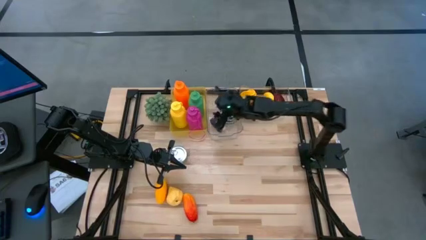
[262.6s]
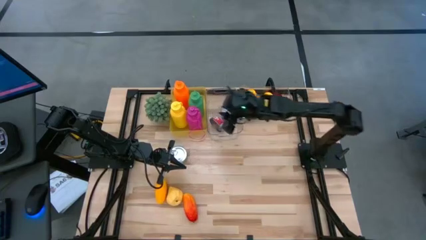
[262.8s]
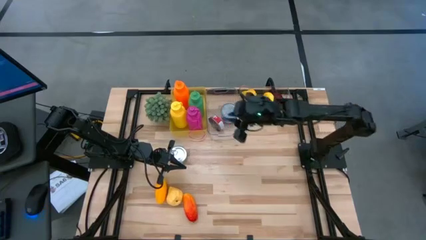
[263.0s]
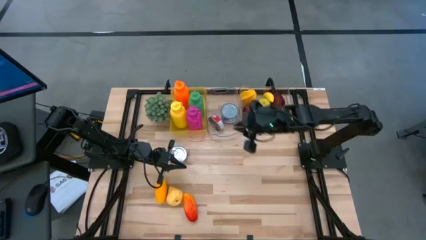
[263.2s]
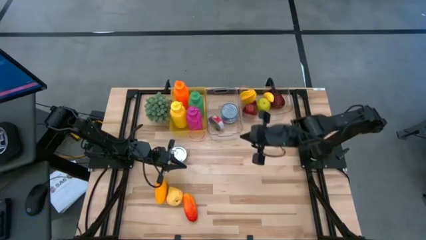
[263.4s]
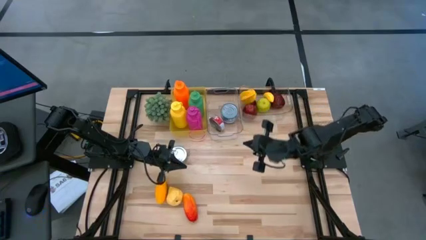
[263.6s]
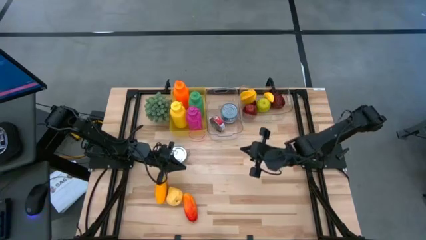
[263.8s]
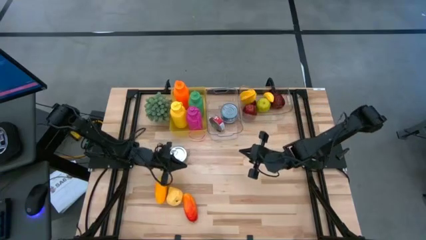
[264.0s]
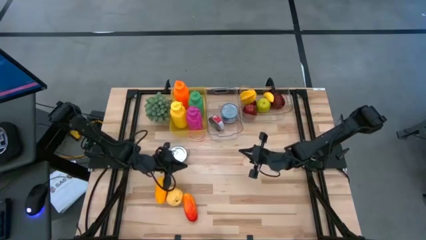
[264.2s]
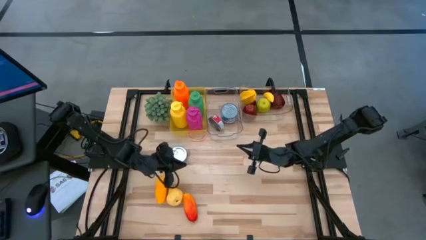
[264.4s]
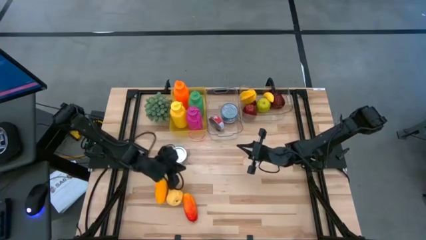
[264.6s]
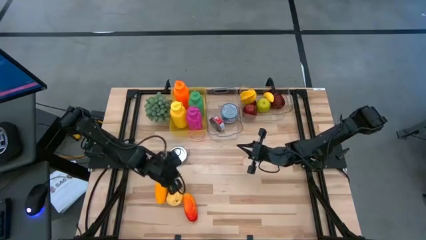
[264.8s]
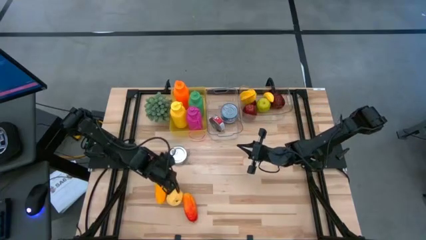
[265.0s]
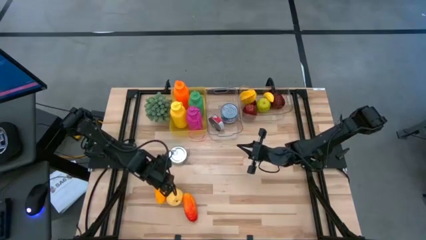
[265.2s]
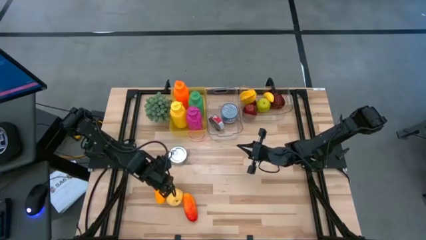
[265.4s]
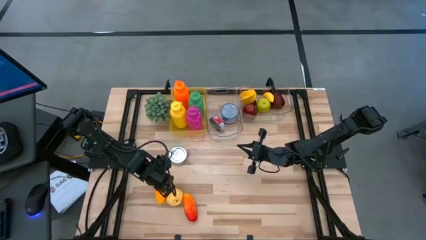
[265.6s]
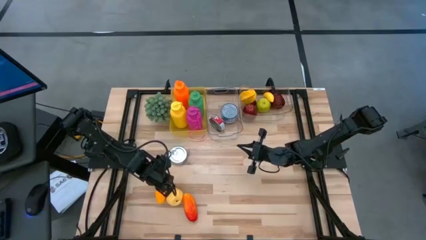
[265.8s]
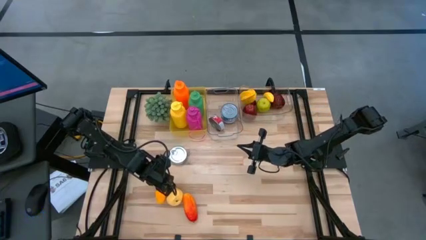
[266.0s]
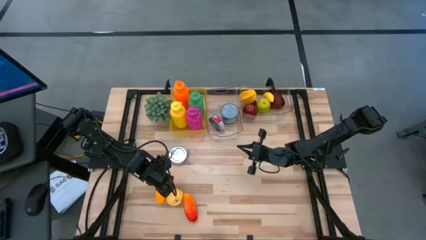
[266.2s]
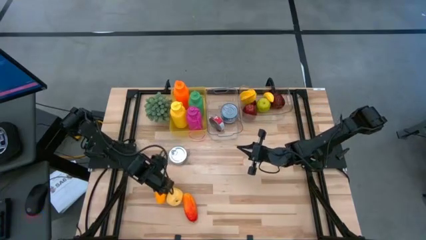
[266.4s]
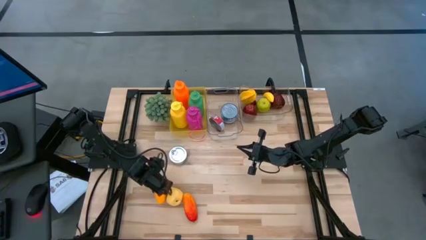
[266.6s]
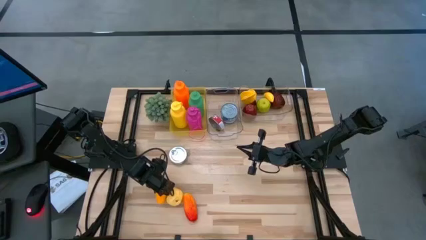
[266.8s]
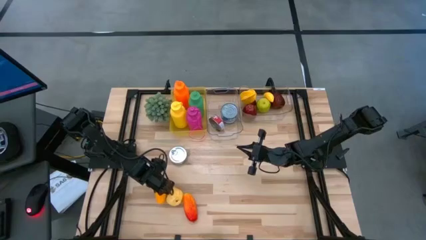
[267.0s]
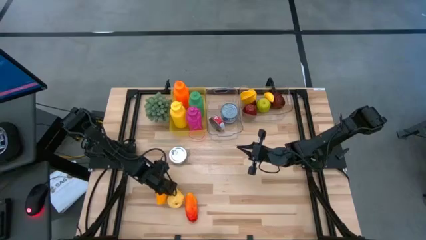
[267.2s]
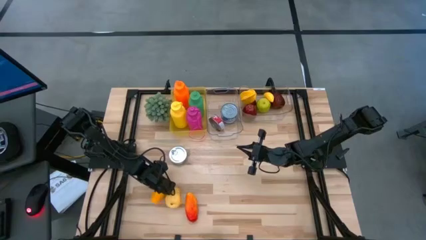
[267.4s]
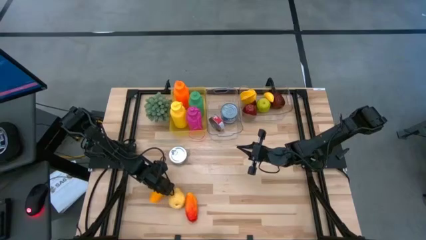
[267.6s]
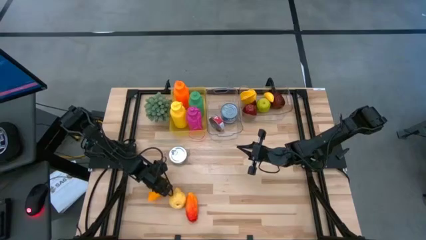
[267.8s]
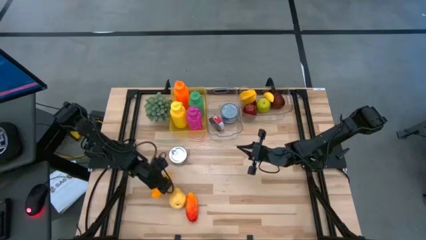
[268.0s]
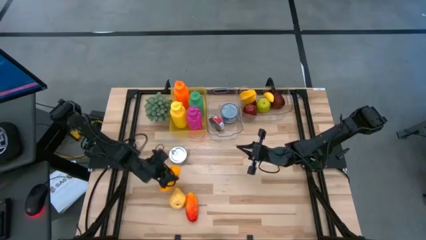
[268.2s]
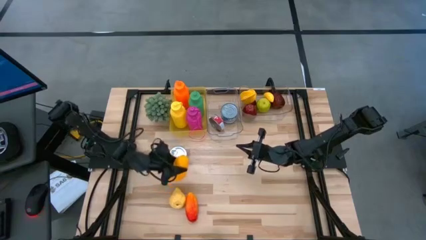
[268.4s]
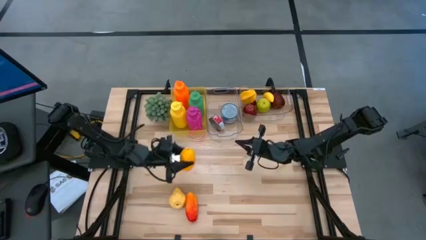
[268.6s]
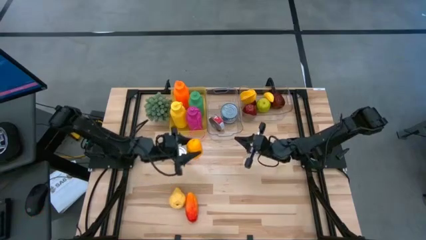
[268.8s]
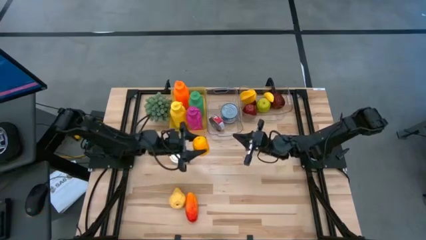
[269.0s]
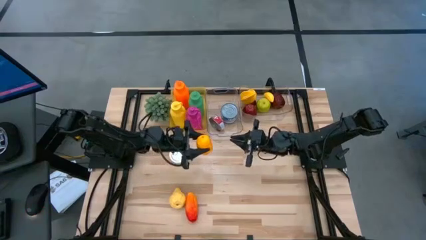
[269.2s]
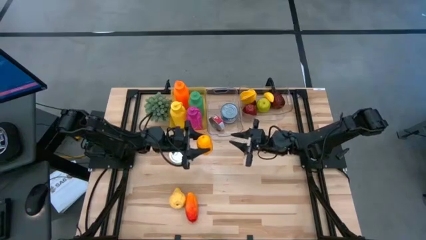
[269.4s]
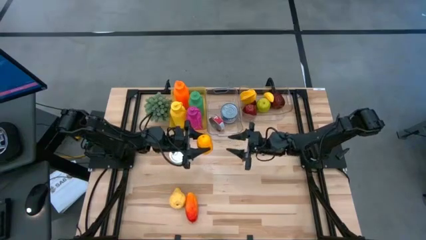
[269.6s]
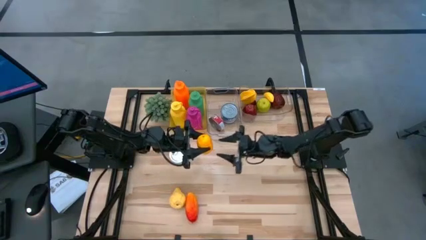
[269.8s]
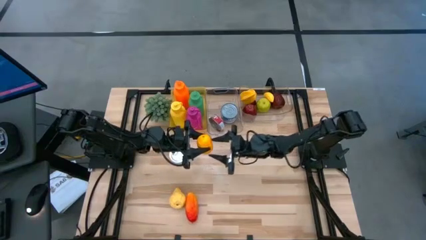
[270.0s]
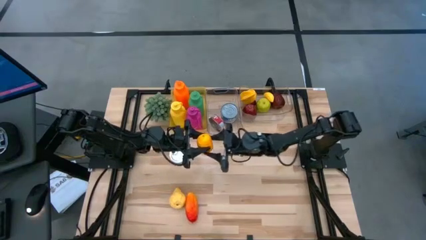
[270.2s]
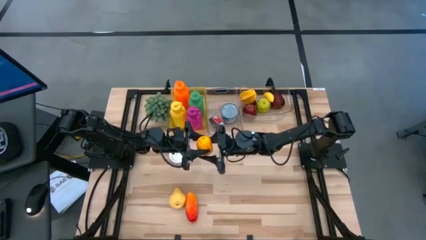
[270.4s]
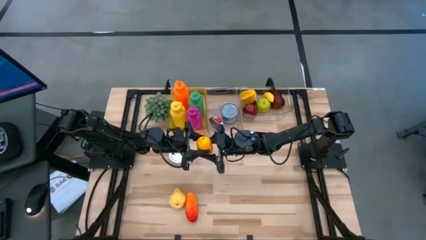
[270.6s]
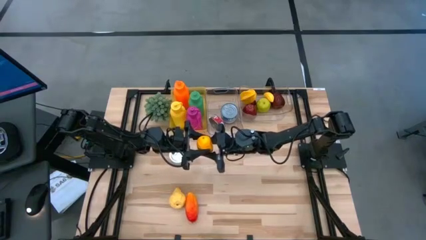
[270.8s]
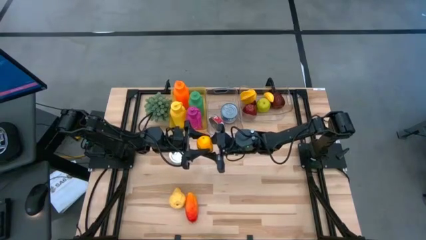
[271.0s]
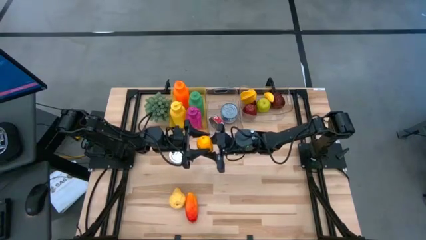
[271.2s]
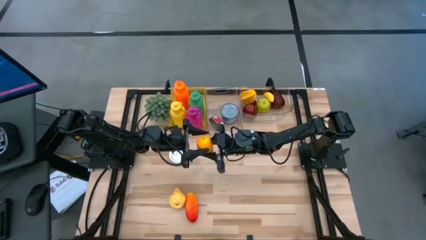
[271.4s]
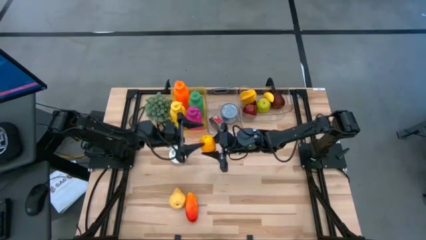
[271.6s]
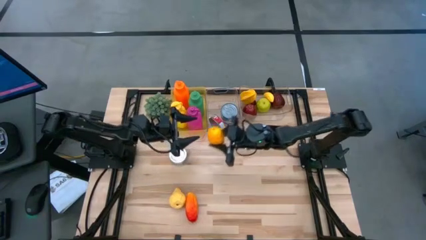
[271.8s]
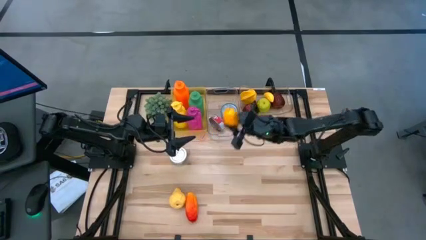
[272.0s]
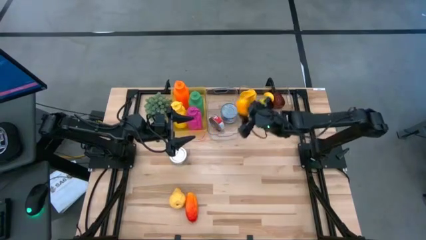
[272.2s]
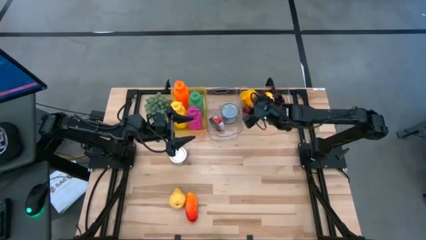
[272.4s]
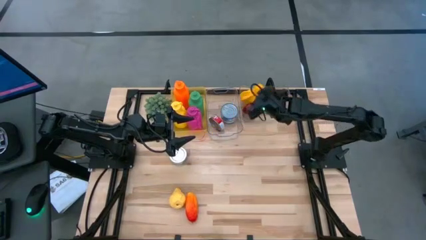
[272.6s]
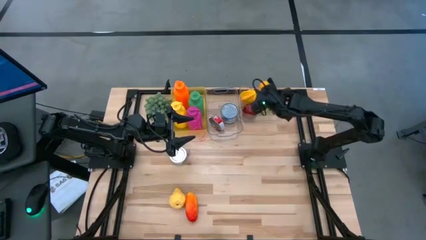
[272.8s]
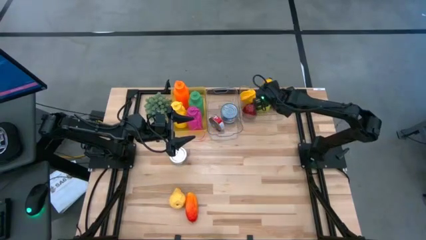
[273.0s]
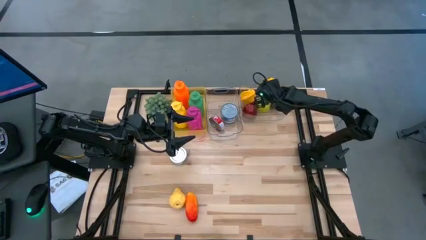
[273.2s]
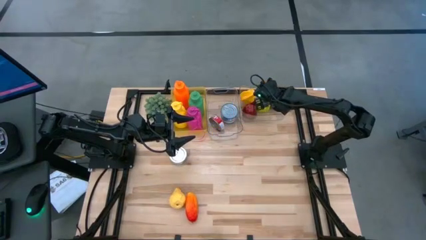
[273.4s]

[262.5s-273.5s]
Task: Pick & Place Food Item
Put the yellow mango into the right transparent bin
